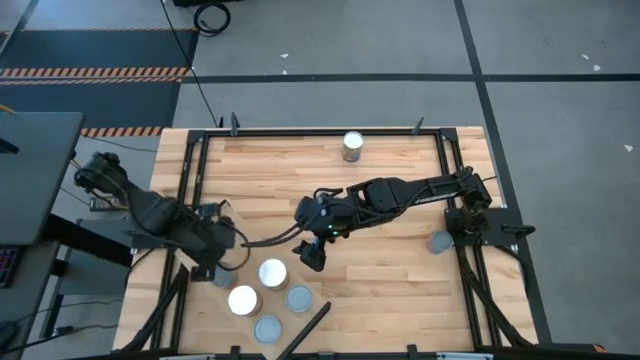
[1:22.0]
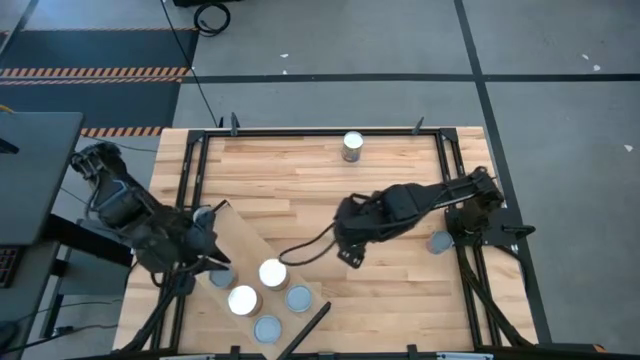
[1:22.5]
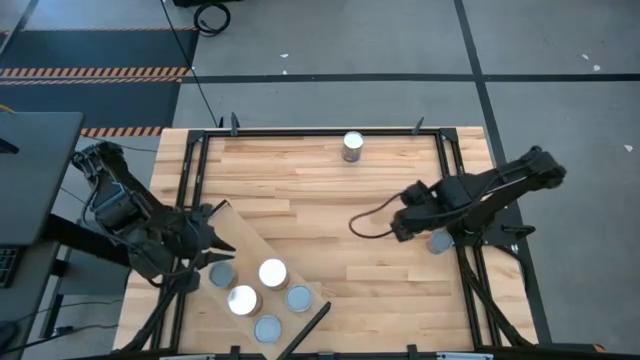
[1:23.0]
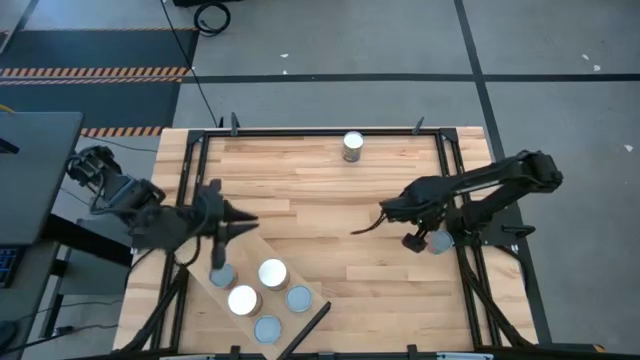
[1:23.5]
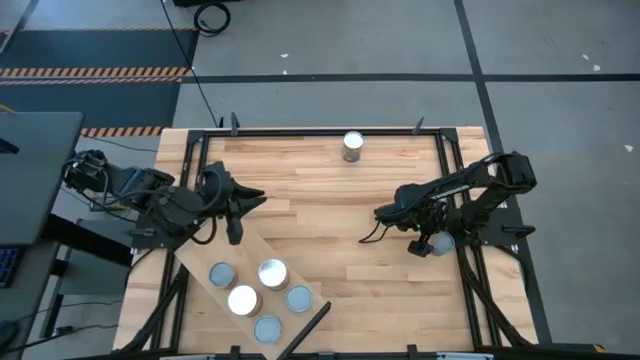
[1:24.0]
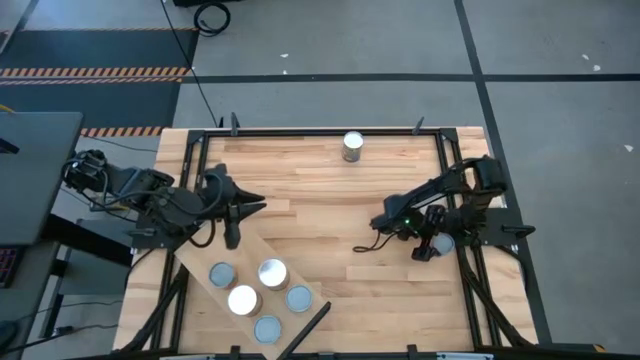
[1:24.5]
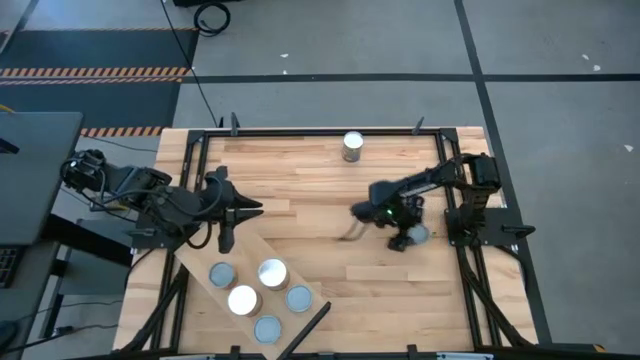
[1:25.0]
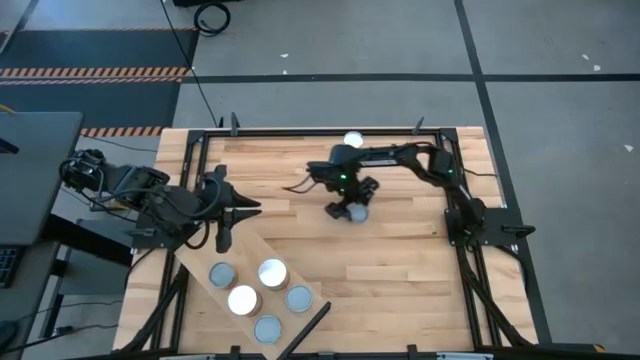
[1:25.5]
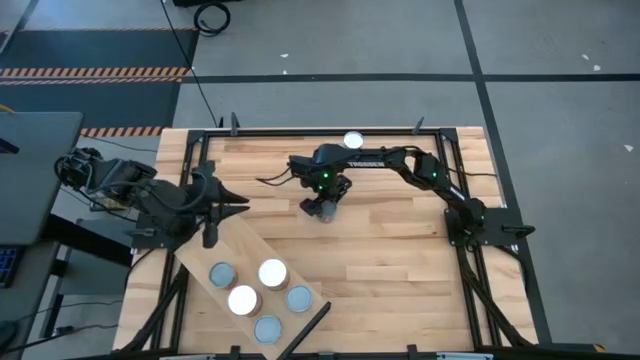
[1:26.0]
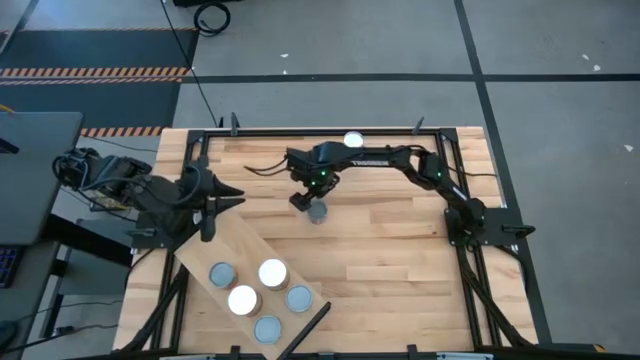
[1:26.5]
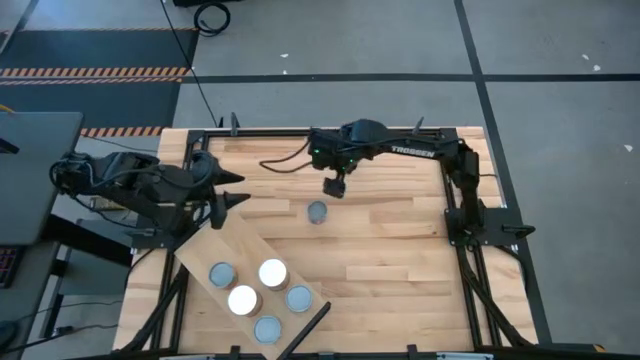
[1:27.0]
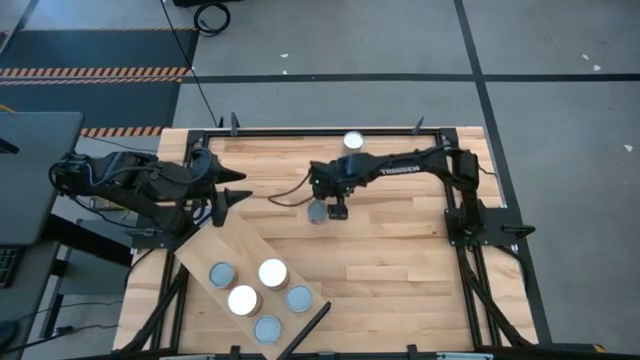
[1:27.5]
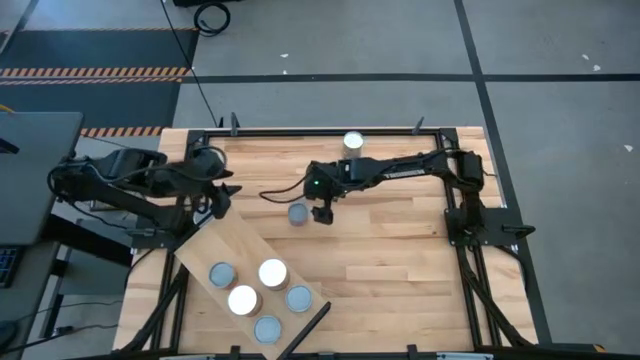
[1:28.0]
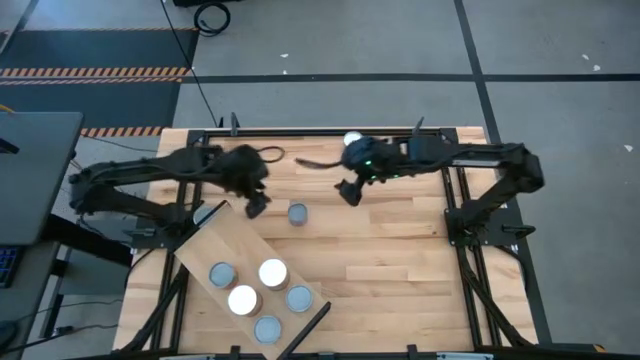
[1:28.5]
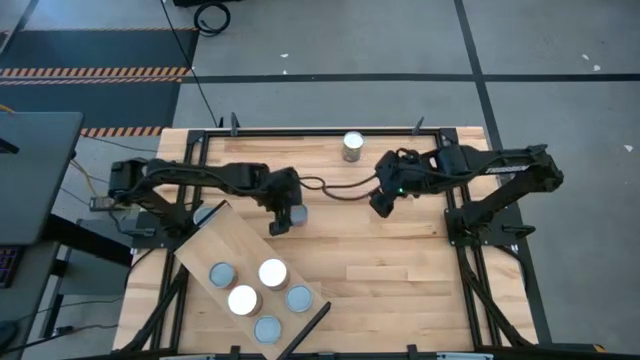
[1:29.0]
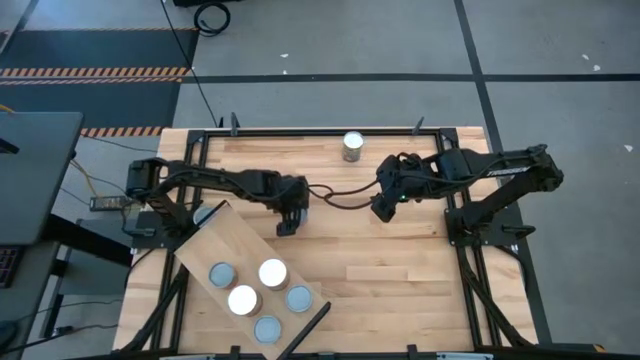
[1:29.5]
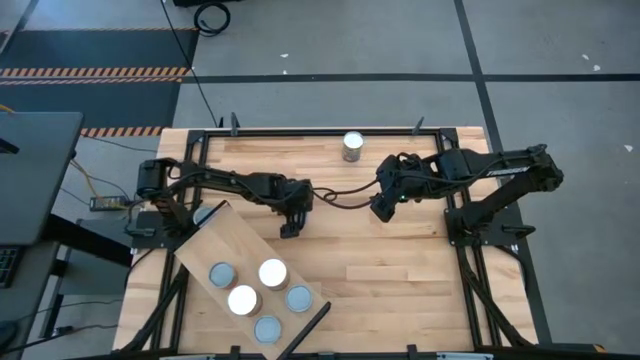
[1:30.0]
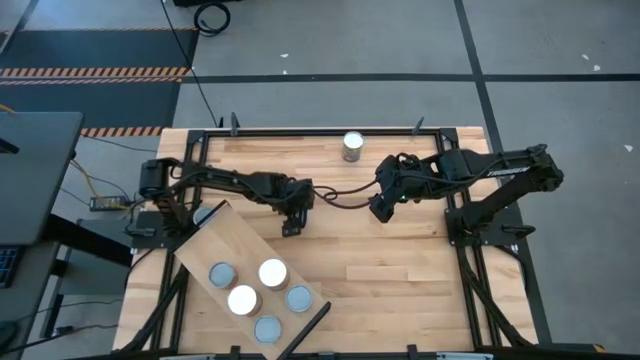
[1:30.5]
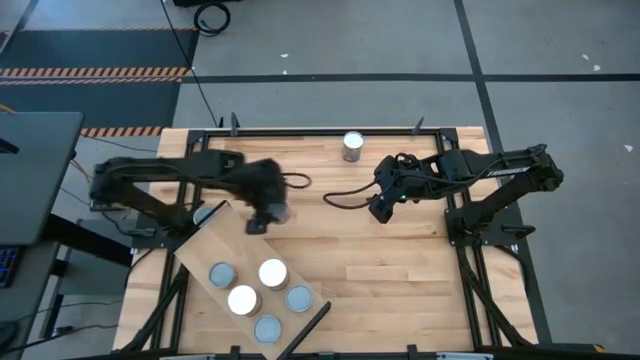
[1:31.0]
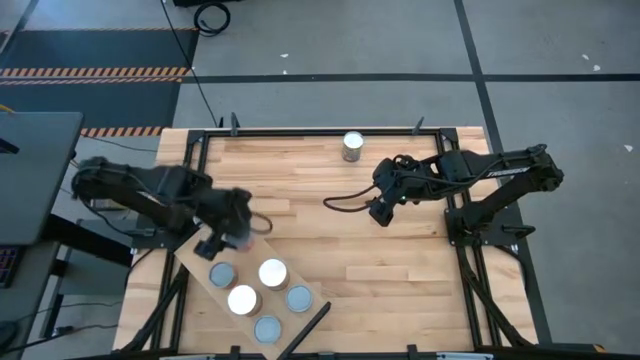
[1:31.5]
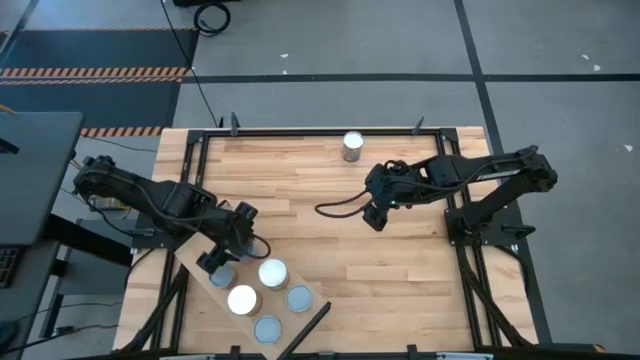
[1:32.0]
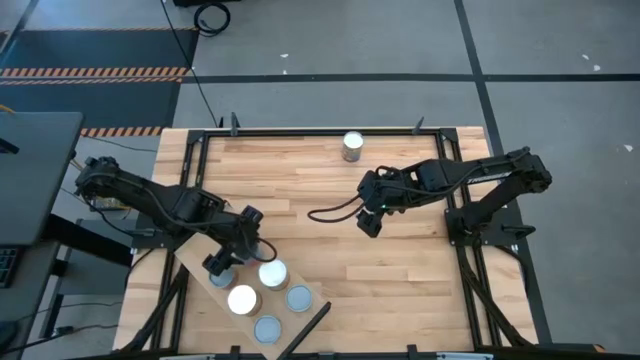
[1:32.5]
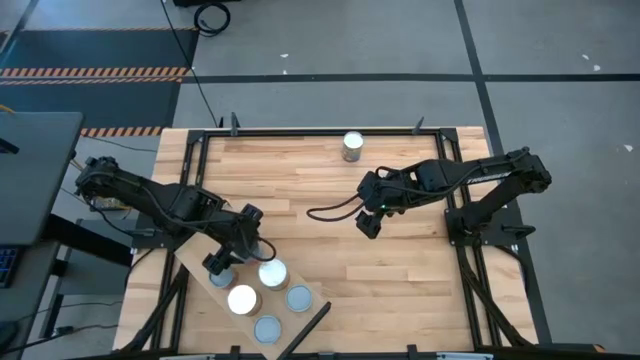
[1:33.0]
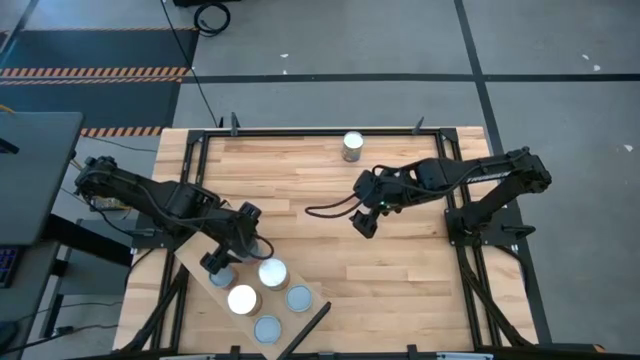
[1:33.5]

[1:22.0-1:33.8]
Task: Pick and place cans onto a shelf
Put the canned mix fruits on the shelf

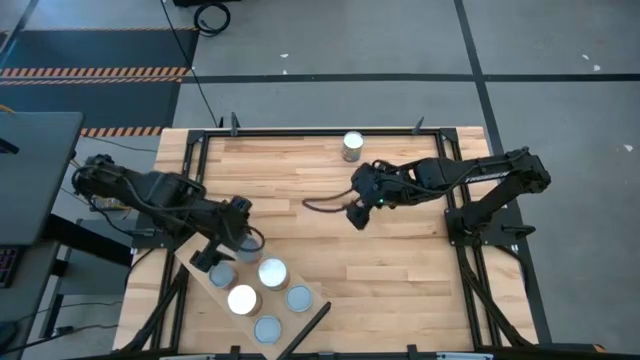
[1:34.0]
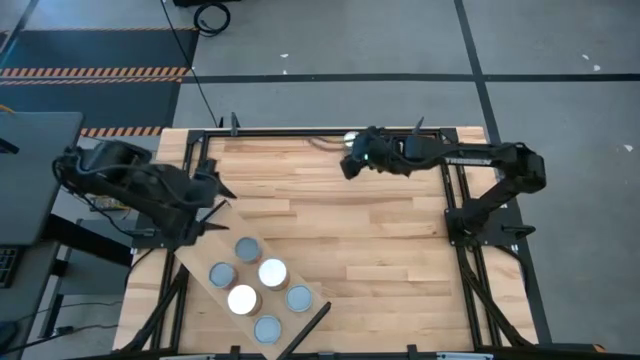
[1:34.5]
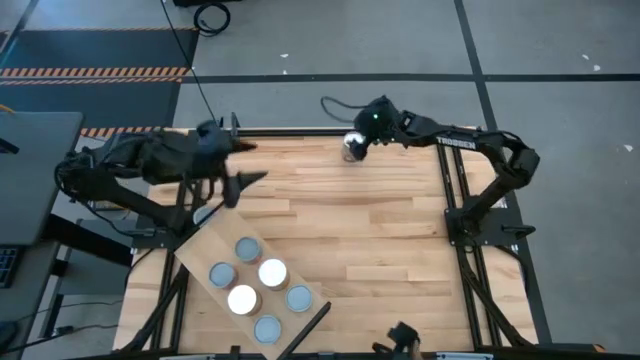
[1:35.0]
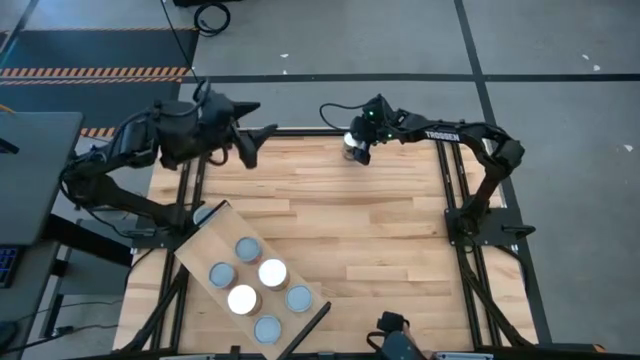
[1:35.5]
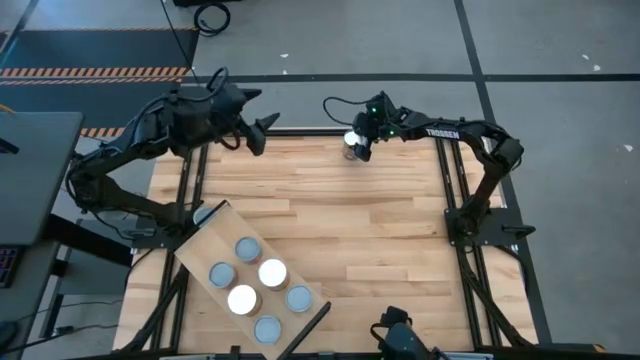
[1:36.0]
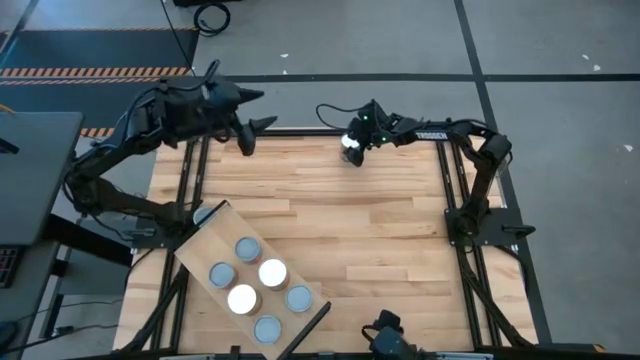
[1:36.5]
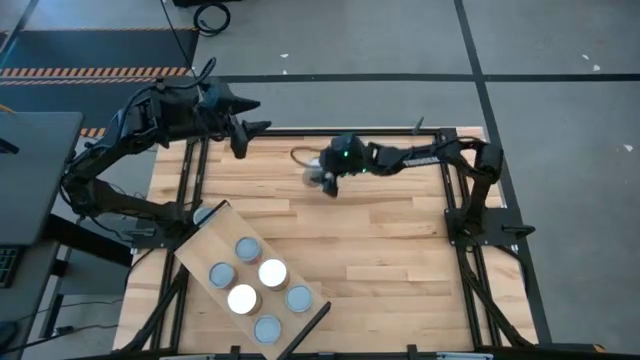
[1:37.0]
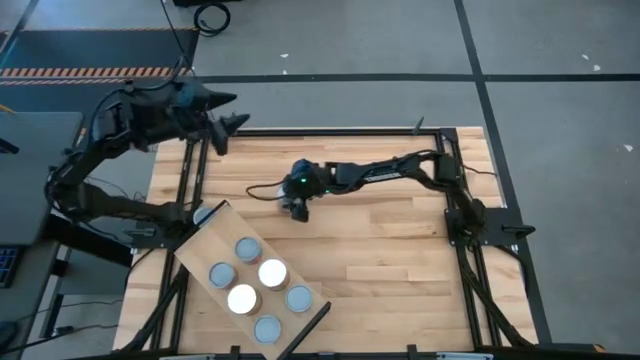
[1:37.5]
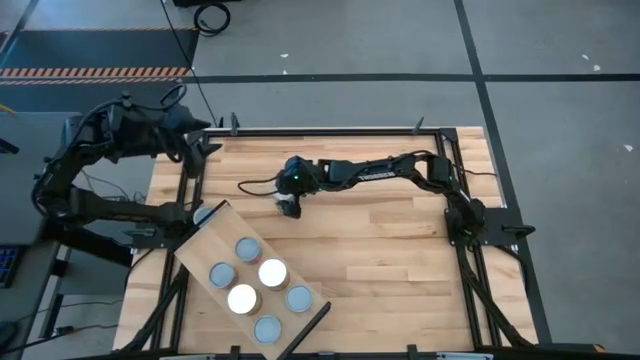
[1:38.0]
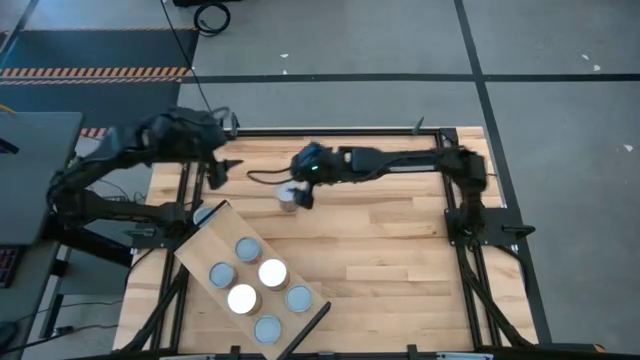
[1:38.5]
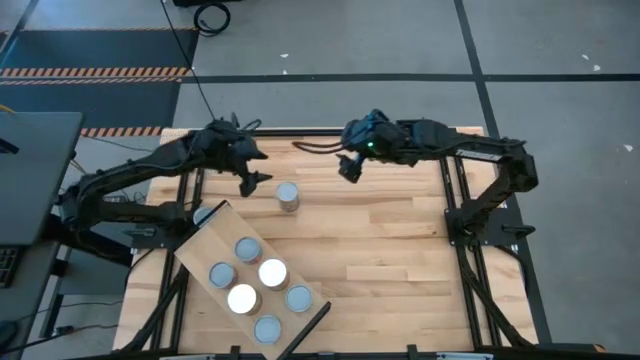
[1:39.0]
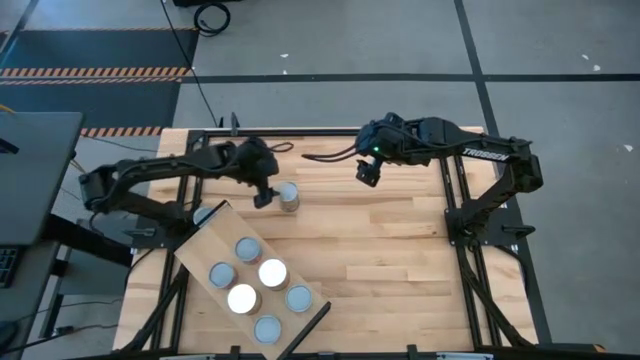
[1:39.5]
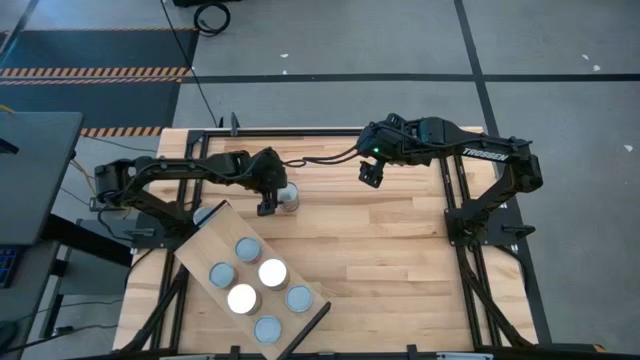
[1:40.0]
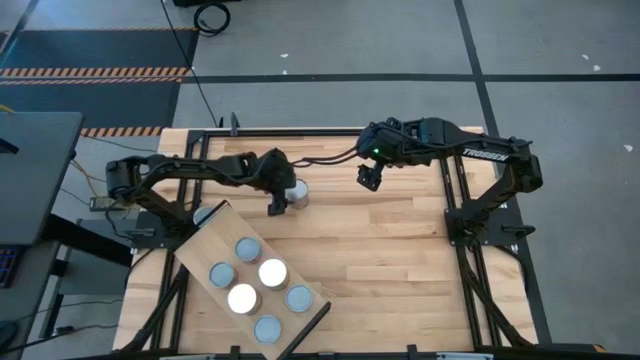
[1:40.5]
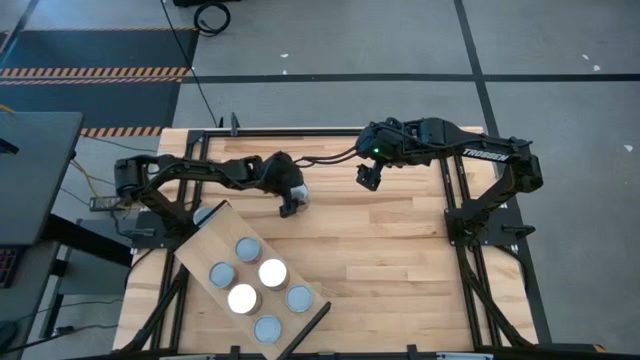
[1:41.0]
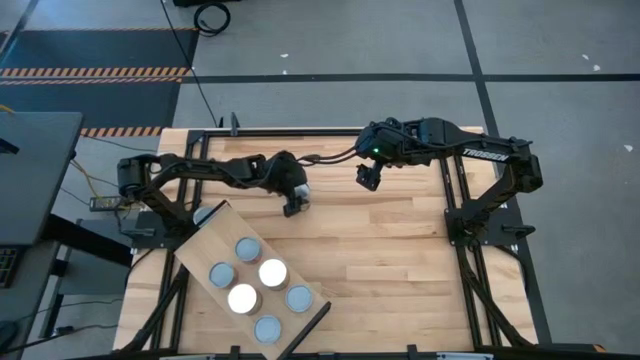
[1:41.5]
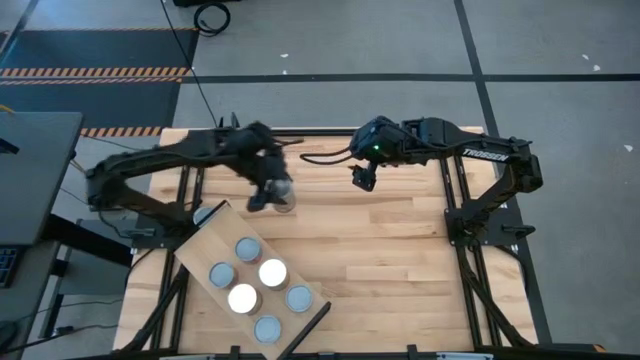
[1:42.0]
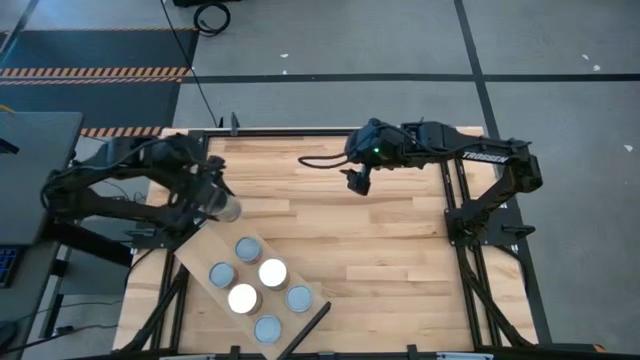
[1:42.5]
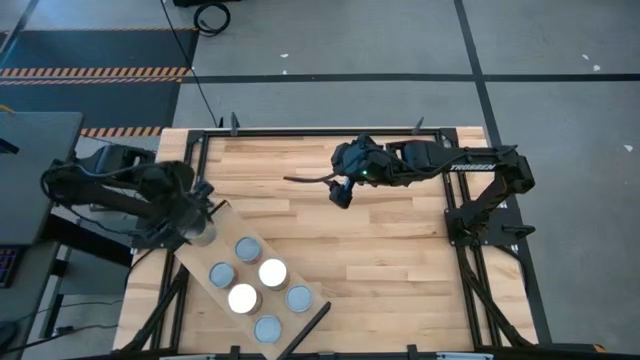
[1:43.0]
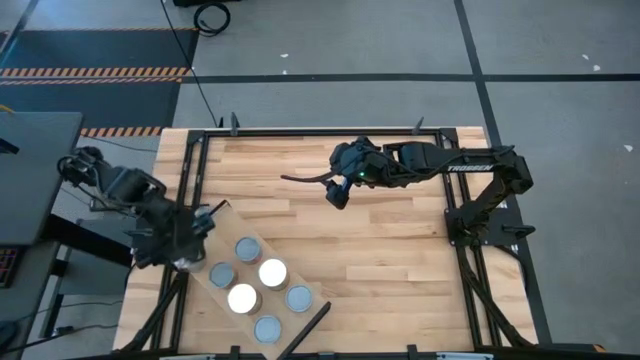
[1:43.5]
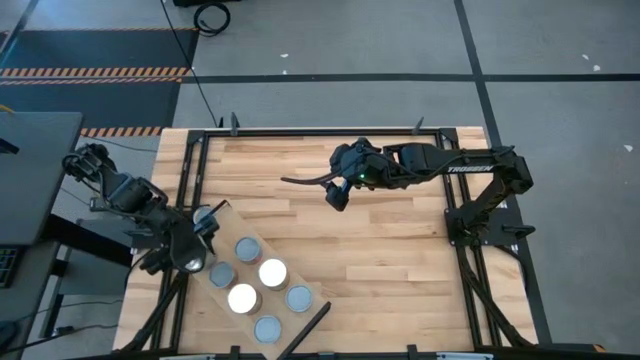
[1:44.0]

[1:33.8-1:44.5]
Put the canned peaches on the shelf
